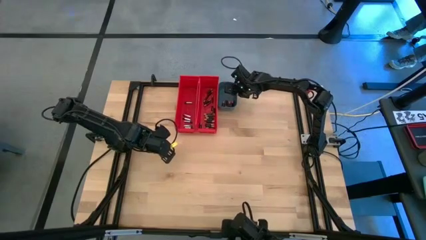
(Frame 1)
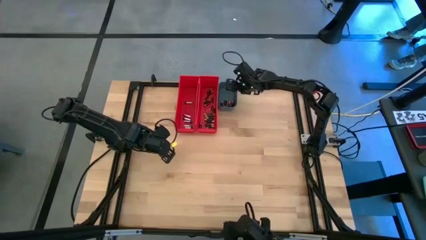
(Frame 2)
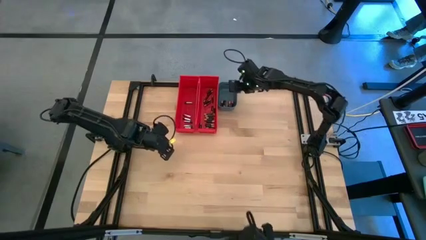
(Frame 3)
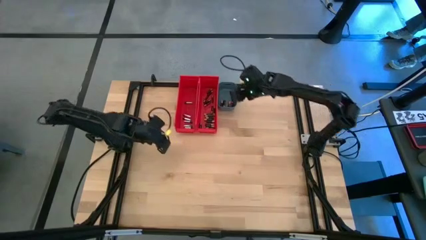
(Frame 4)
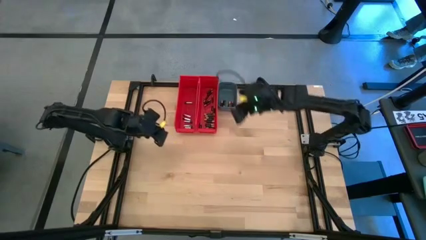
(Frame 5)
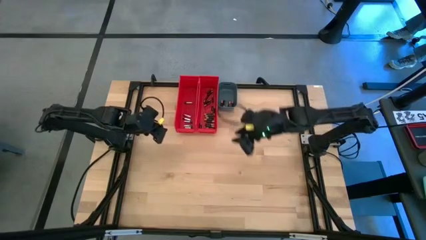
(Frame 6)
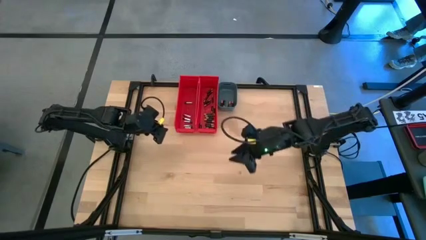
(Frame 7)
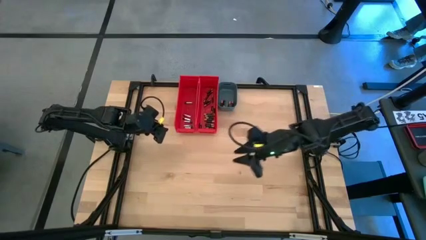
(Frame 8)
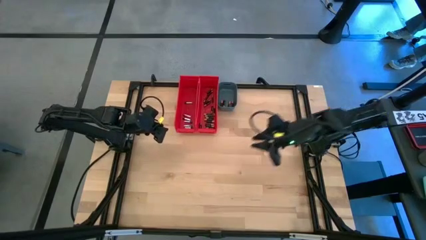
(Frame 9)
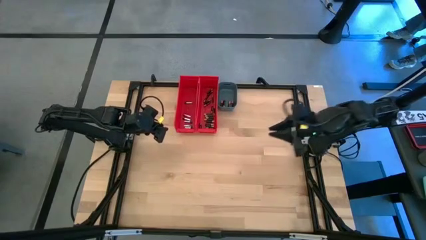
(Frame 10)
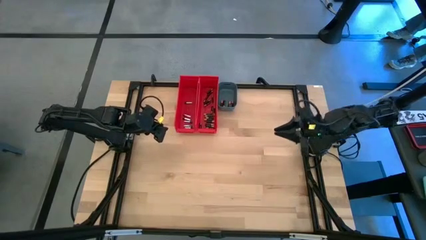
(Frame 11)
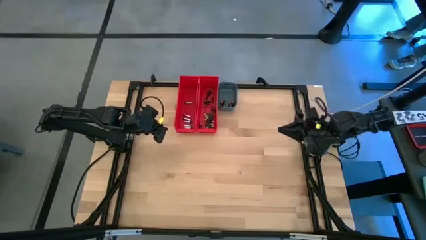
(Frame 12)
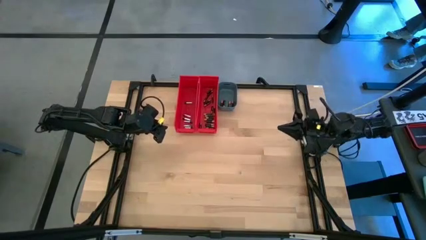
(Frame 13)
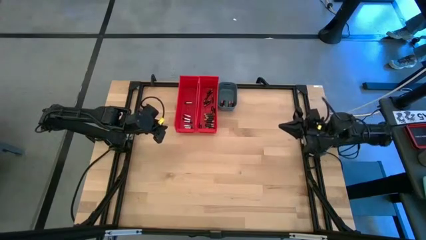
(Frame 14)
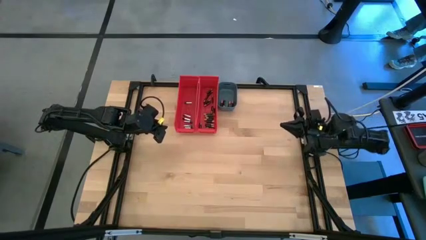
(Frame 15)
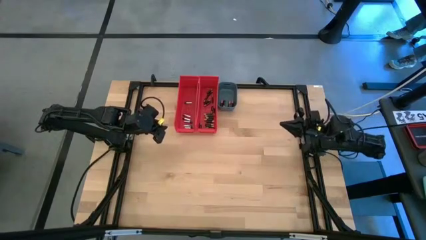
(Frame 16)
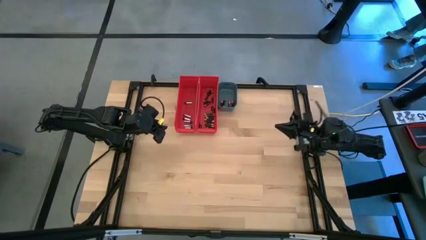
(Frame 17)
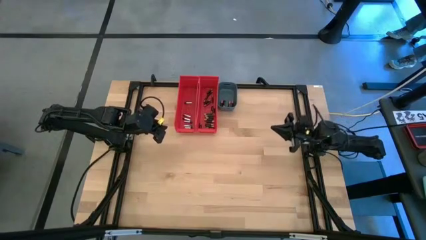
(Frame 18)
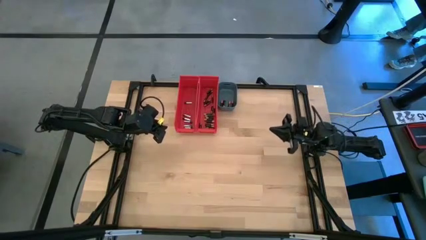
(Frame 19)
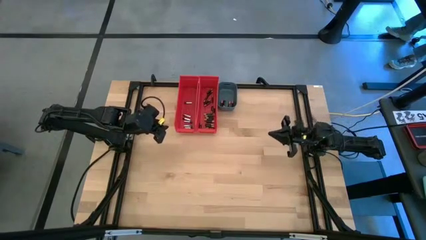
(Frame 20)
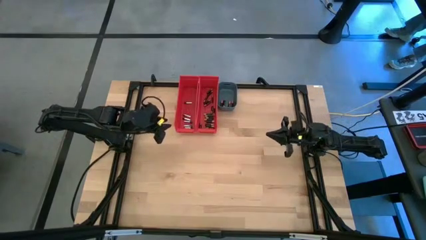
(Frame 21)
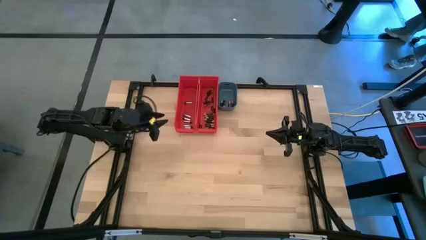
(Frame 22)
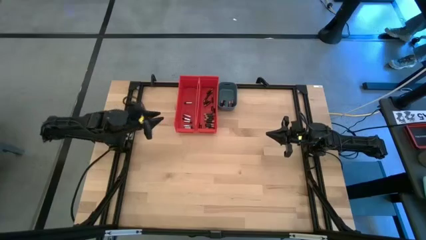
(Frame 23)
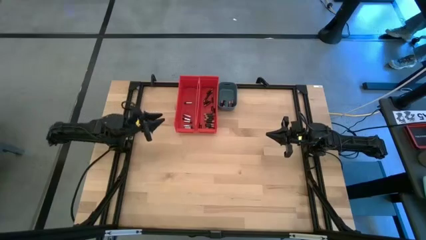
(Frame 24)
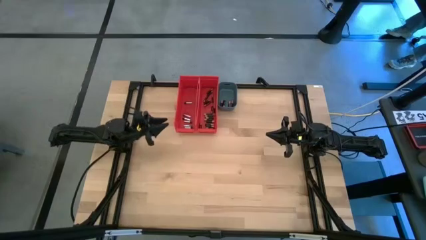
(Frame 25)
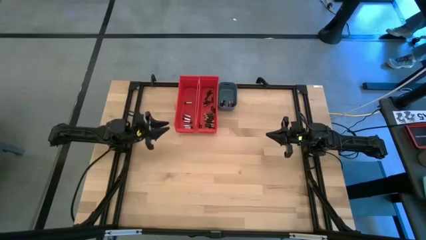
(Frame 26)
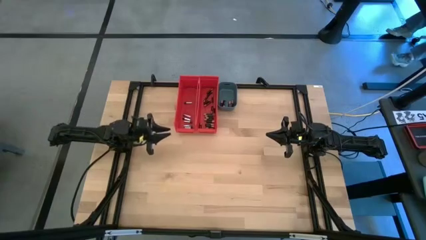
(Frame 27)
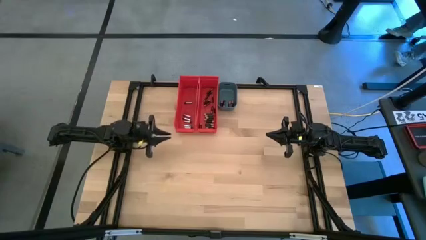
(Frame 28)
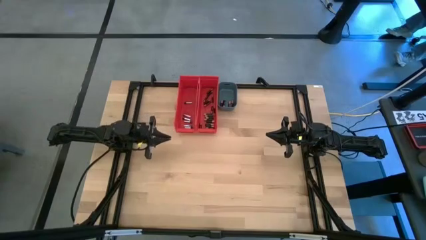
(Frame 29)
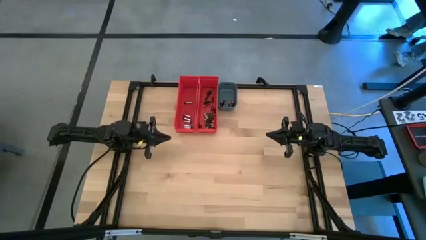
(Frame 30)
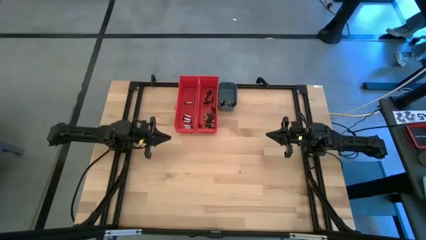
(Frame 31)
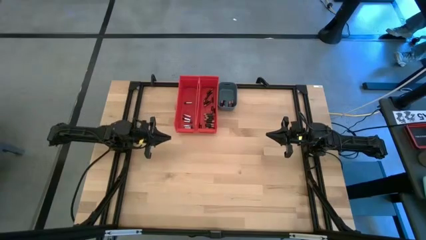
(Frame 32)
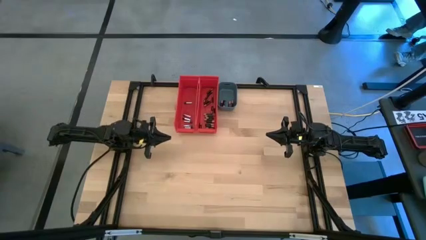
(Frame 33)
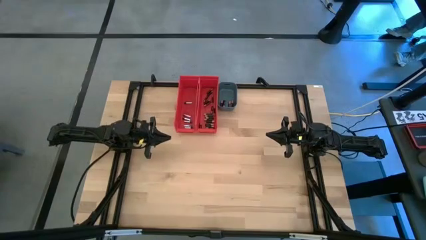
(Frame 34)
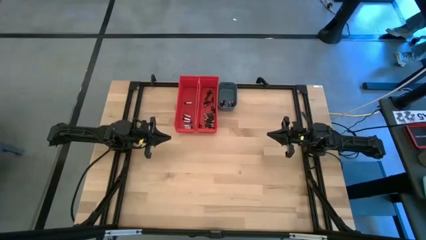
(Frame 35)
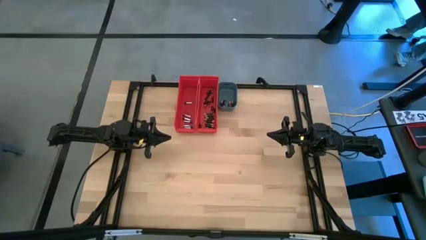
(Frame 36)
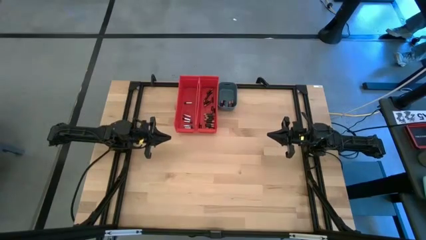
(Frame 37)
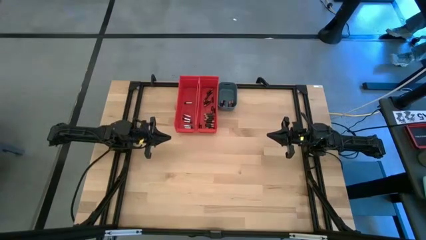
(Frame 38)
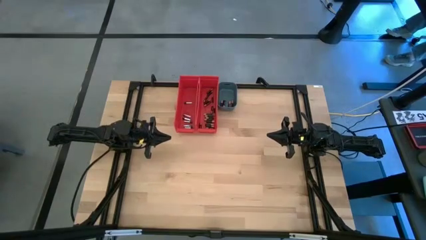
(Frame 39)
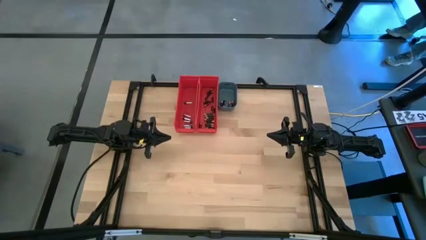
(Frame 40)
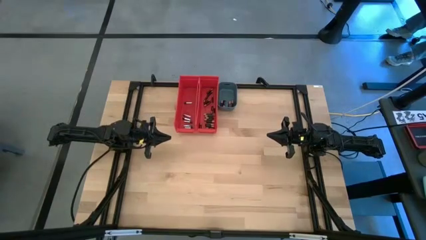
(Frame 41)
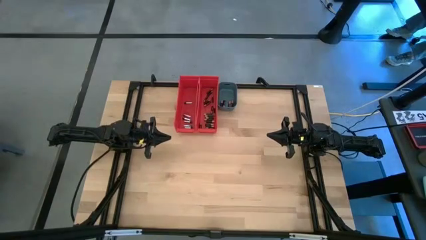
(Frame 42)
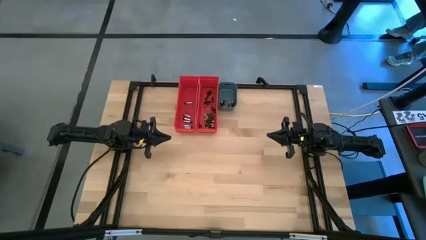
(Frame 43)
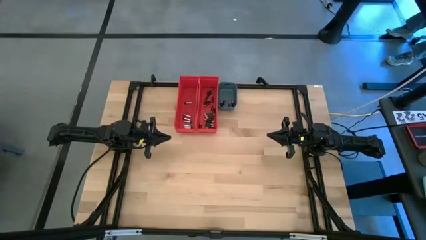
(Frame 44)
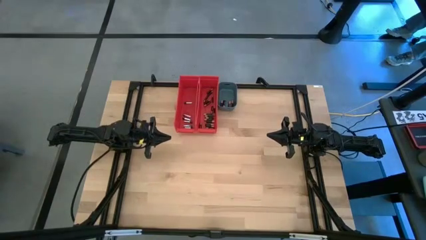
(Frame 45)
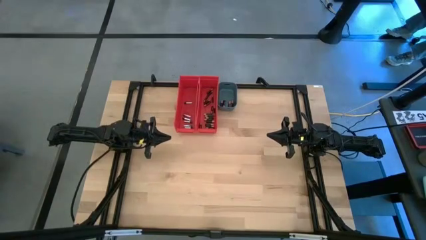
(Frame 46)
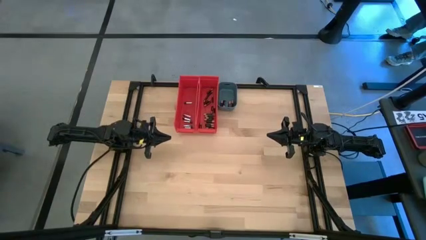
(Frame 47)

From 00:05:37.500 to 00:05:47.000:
Task: Sort batteries
Return to Home Position
